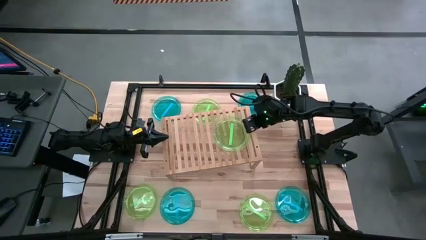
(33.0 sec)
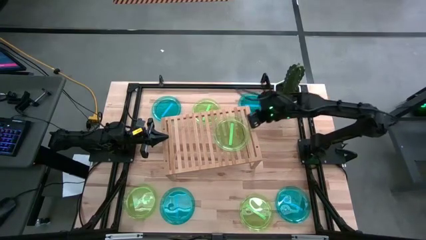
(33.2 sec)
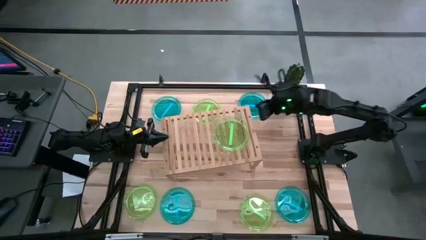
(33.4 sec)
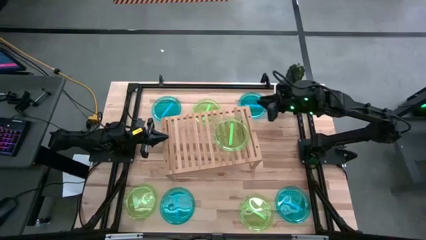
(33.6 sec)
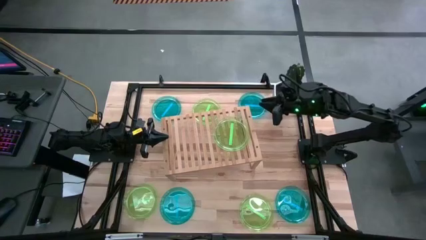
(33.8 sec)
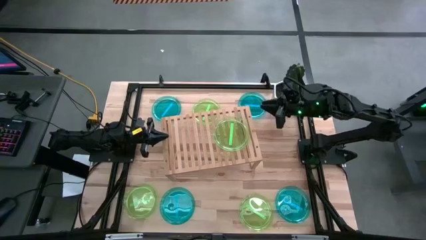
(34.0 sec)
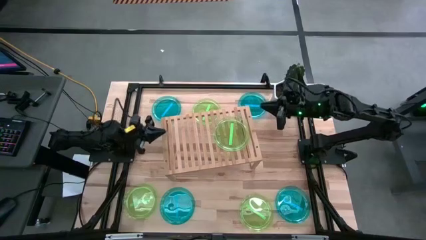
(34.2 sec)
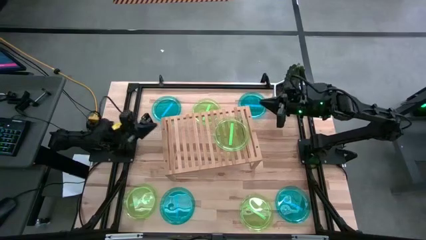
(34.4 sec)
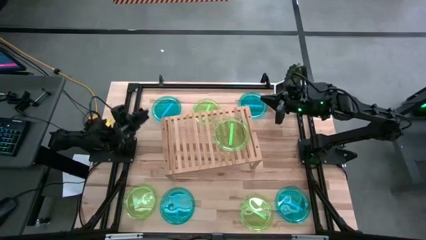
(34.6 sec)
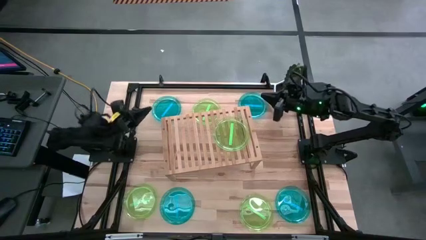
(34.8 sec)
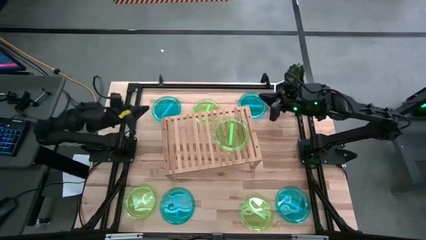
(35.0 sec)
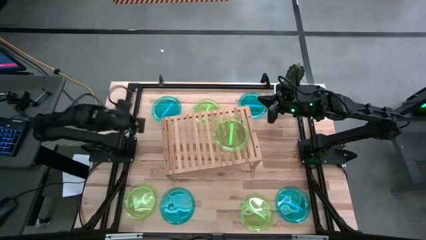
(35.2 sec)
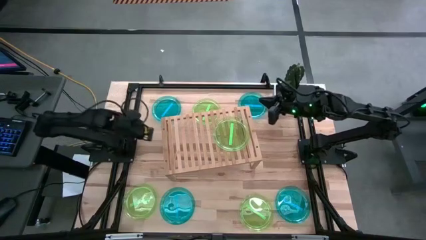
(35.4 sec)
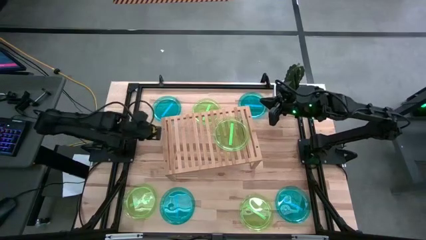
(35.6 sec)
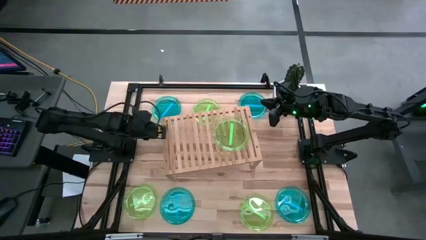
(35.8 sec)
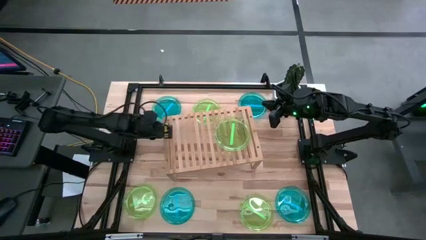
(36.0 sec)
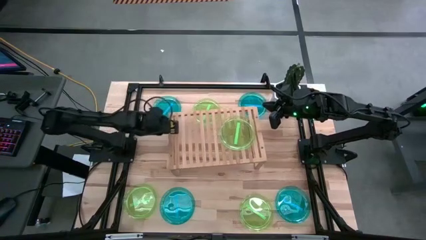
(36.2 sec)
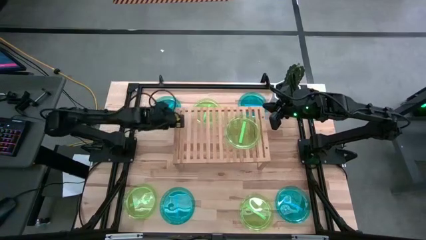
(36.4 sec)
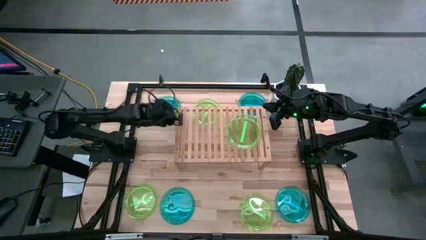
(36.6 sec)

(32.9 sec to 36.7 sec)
Task: Place and stack plates onto a shelf
Adjust the shelf

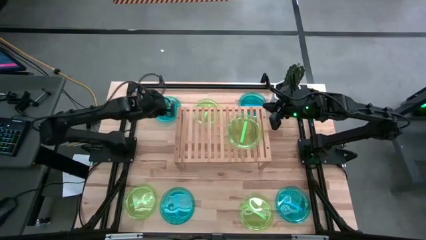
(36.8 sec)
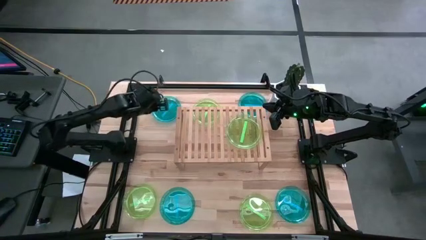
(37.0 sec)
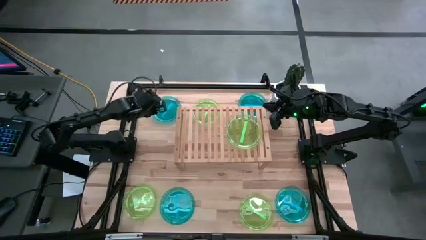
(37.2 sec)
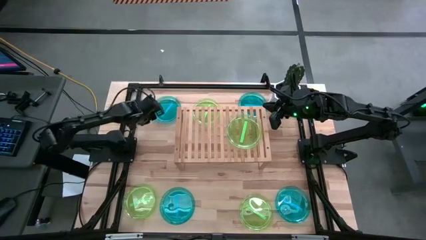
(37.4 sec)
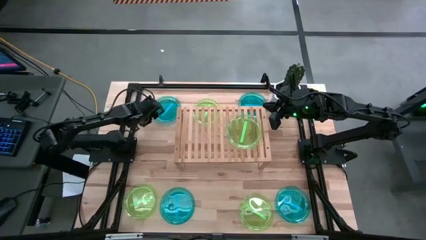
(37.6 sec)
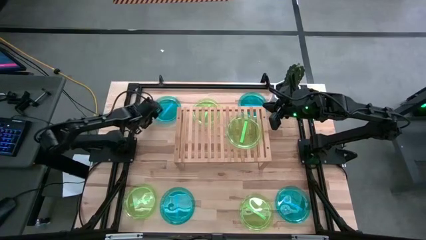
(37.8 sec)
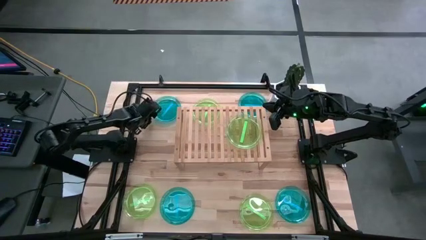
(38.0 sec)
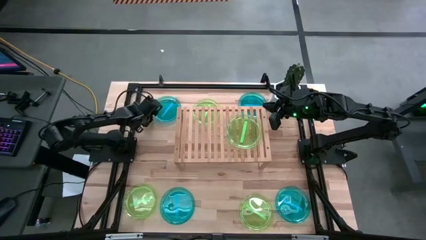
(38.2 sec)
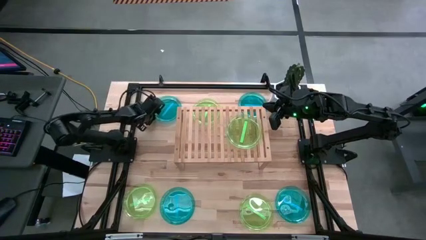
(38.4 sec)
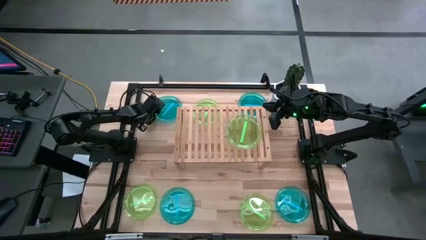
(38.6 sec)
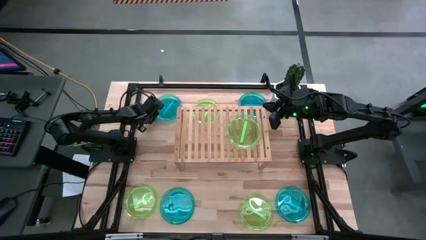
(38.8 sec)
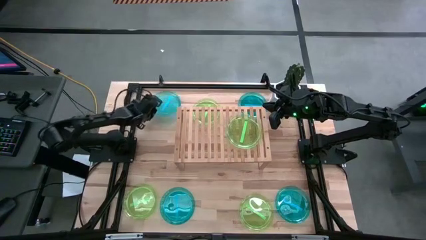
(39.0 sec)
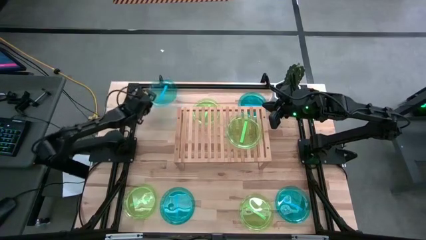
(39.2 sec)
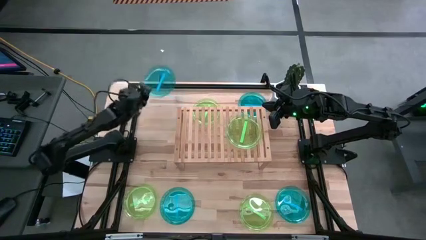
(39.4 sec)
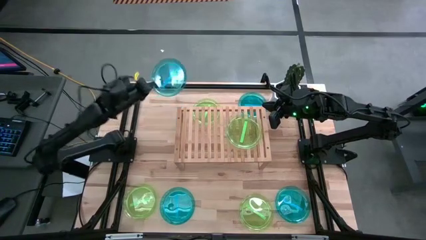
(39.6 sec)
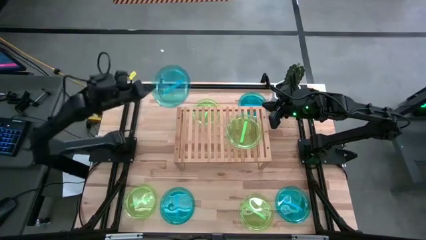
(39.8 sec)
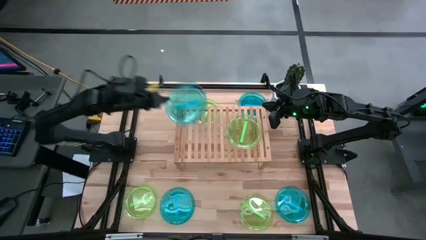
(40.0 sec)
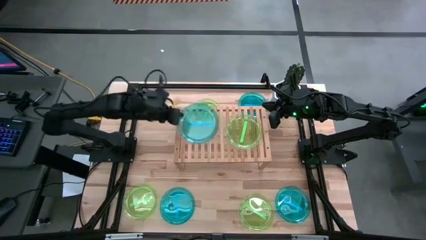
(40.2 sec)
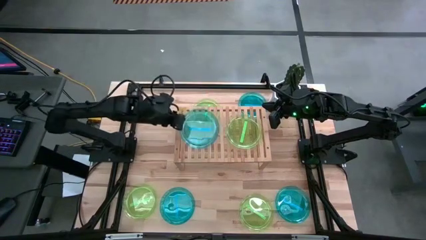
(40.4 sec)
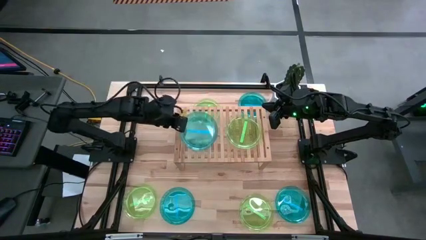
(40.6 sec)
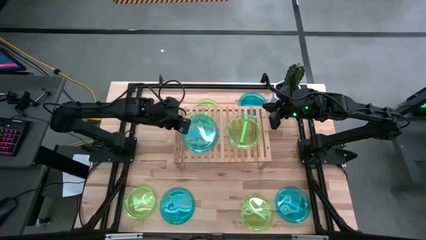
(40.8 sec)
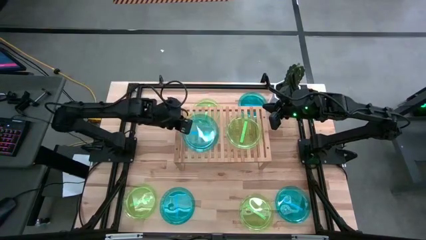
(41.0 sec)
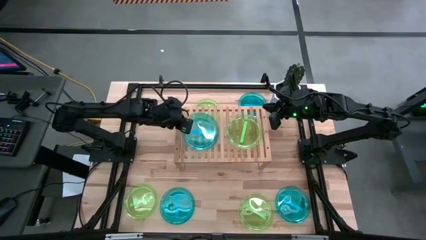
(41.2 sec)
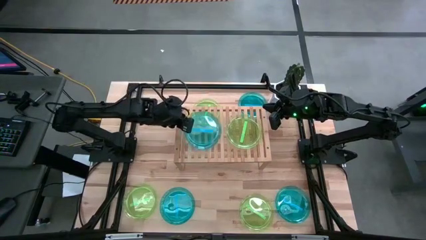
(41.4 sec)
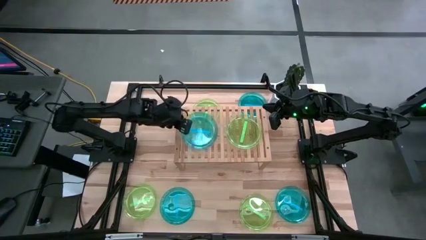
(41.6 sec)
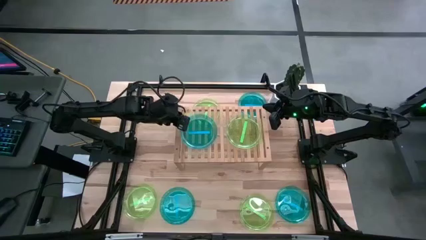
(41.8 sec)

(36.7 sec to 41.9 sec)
Put the blue plate on the shelf

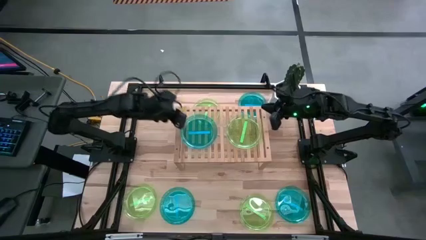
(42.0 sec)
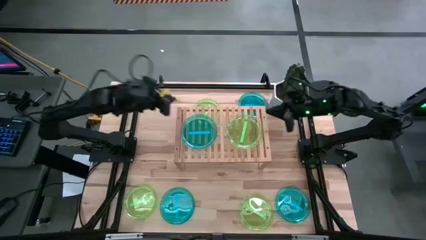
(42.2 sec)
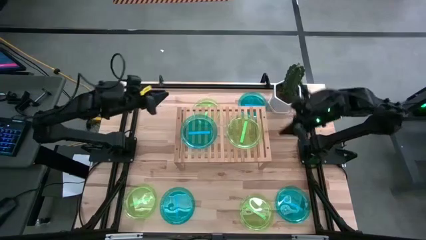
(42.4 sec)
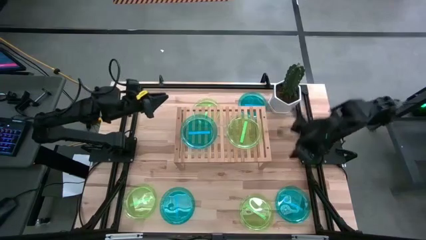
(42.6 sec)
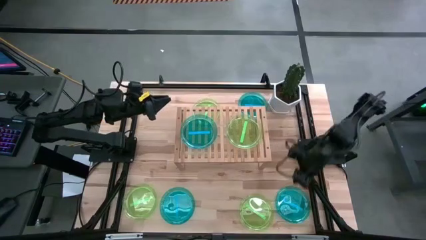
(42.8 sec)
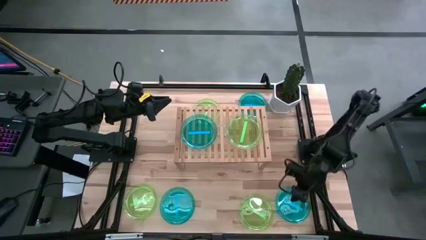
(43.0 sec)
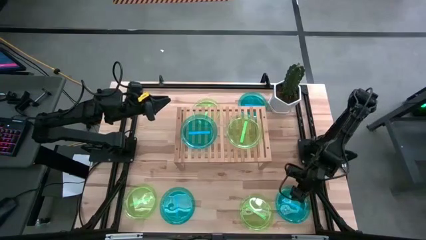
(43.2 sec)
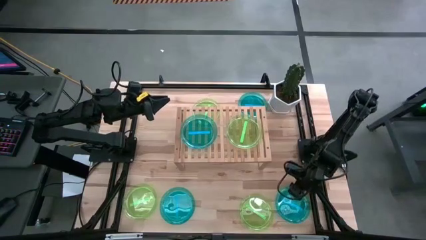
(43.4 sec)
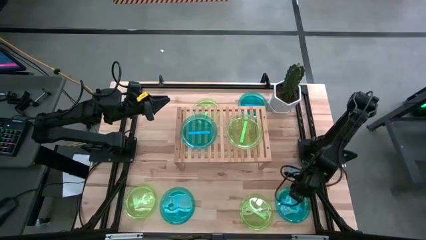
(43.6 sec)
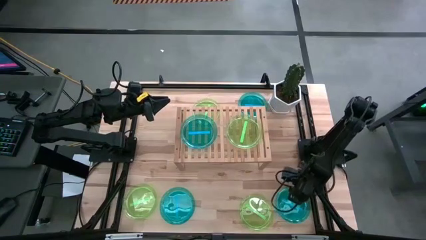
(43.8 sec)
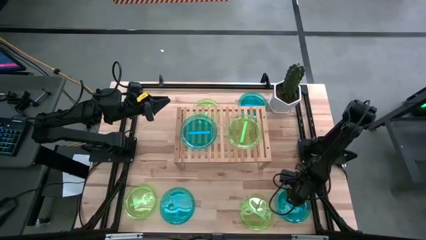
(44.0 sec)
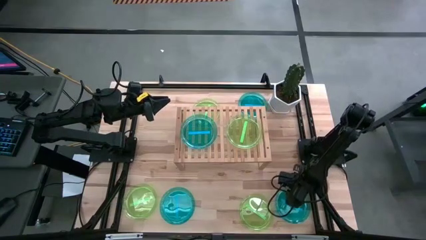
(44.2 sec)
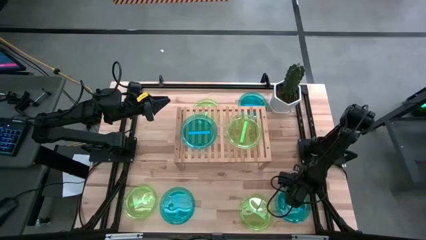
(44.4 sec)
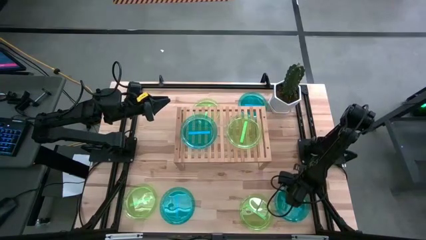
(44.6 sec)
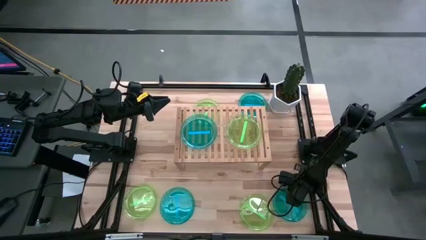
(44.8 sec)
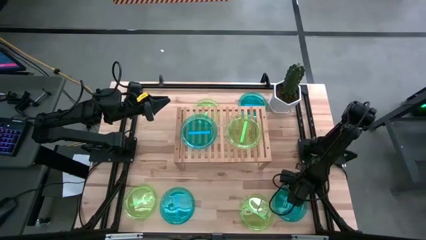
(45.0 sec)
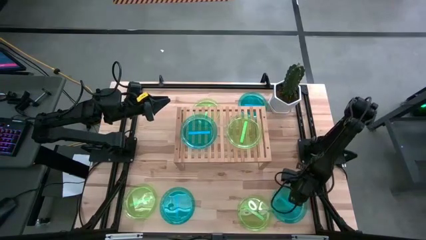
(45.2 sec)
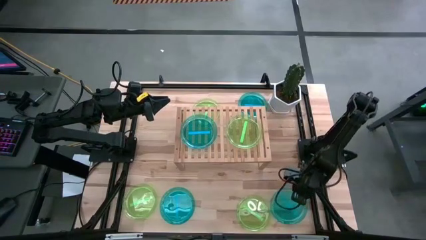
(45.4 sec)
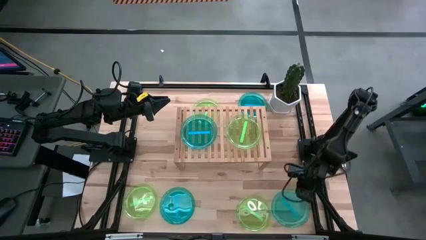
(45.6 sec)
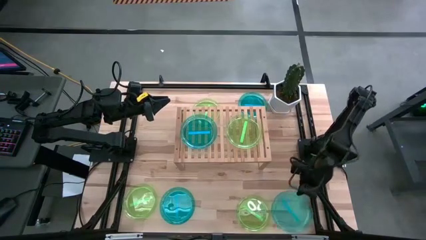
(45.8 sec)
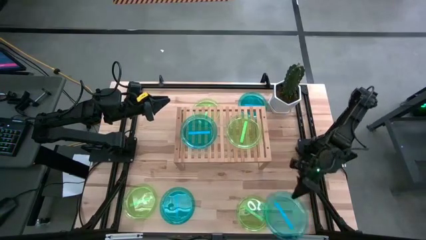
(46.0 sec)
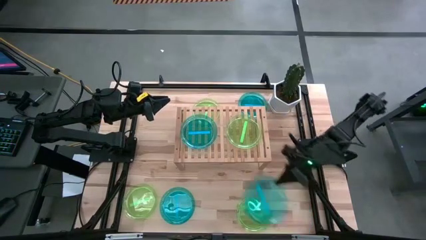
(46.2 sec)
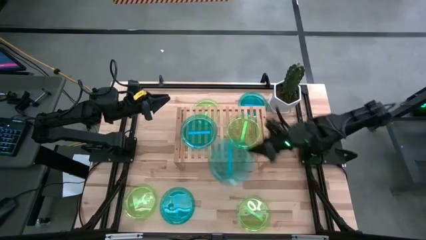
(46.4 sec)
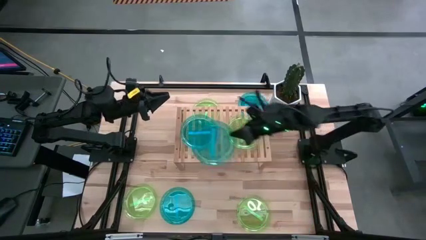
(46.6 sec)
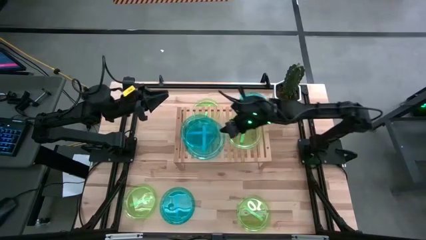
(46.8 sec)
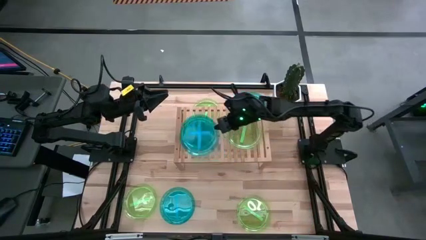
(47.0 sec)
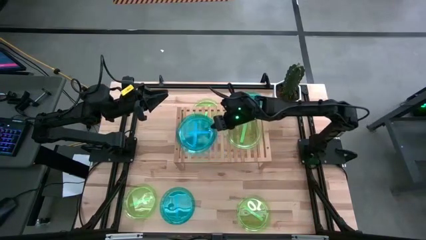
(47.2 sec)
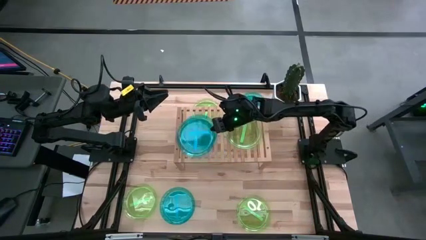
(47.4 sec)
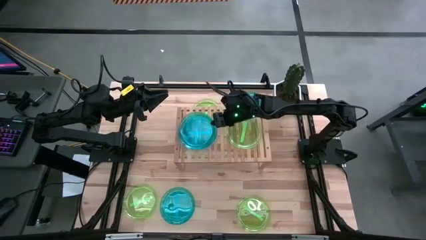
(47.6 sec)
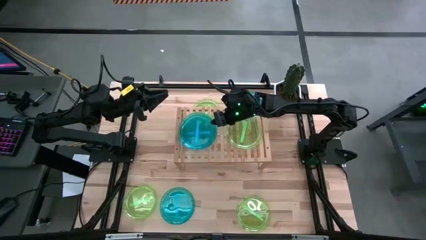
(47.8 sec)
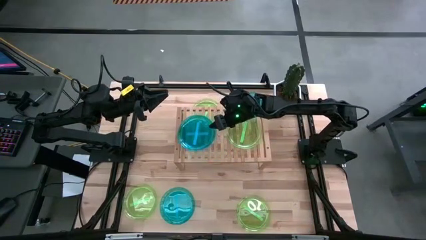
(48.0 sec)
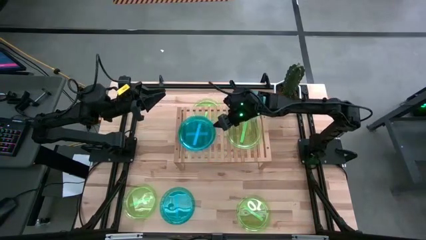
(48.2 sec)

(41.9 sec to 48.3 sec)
Stack the blue plate on top of the other blue plate on the shelf
